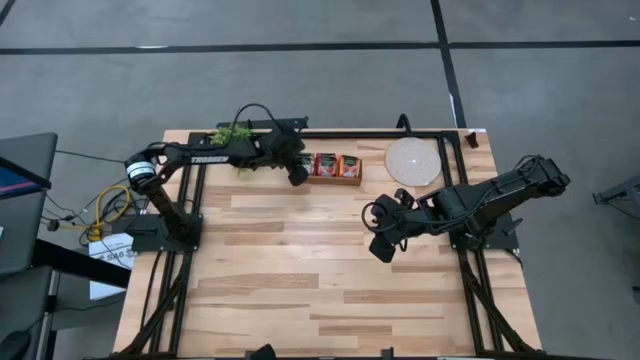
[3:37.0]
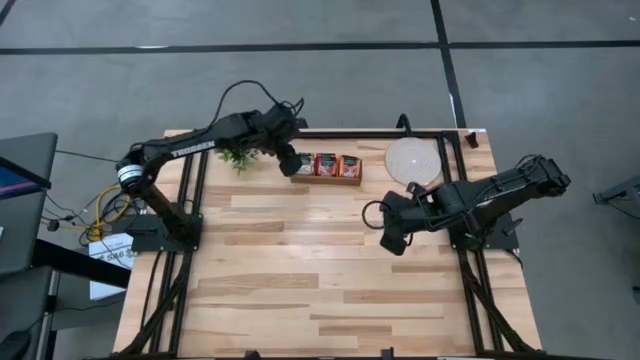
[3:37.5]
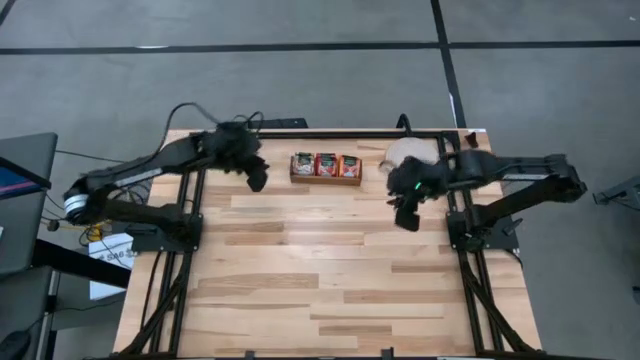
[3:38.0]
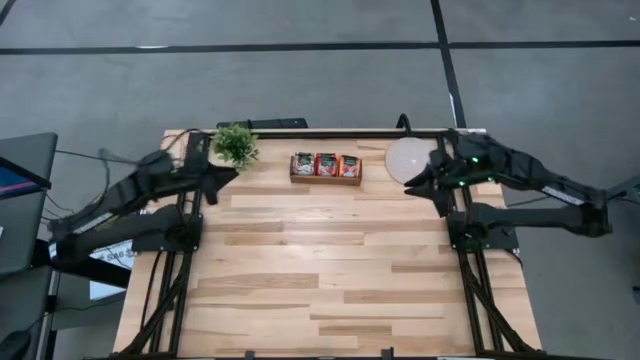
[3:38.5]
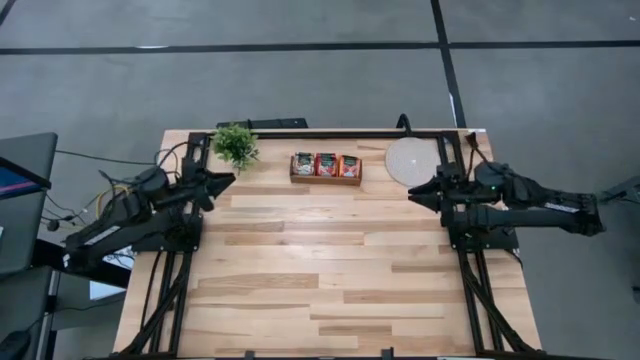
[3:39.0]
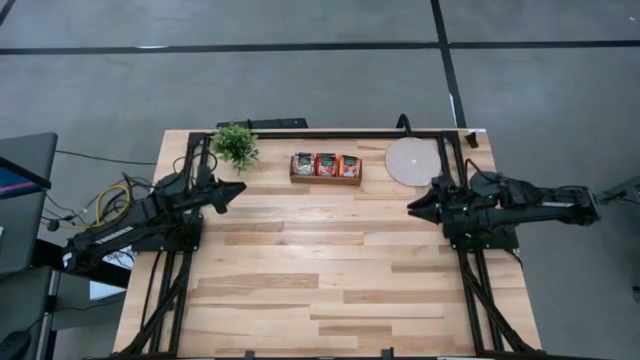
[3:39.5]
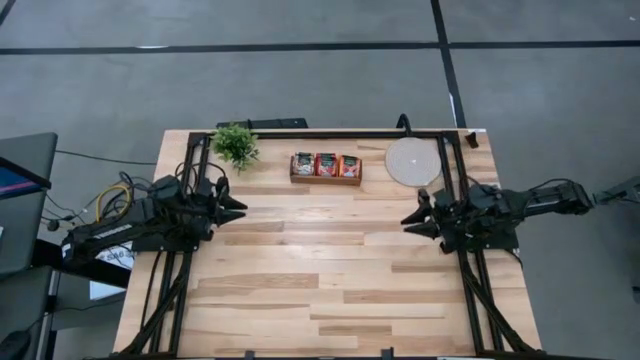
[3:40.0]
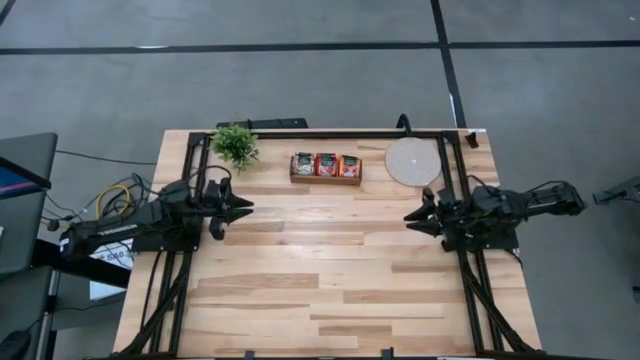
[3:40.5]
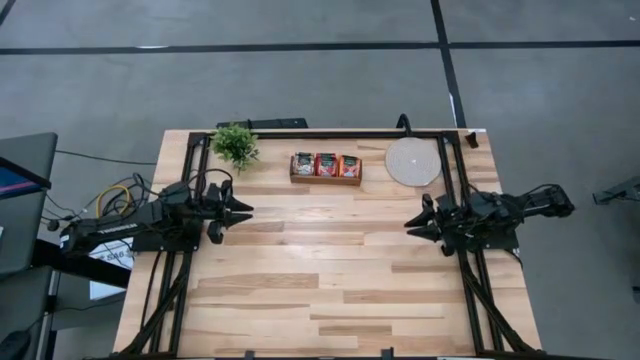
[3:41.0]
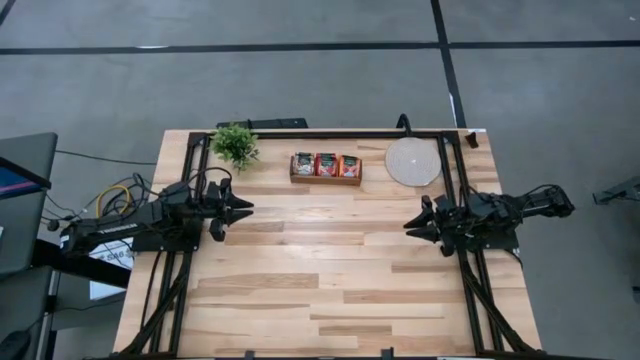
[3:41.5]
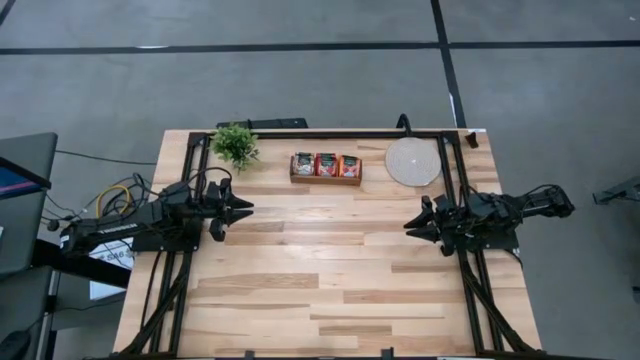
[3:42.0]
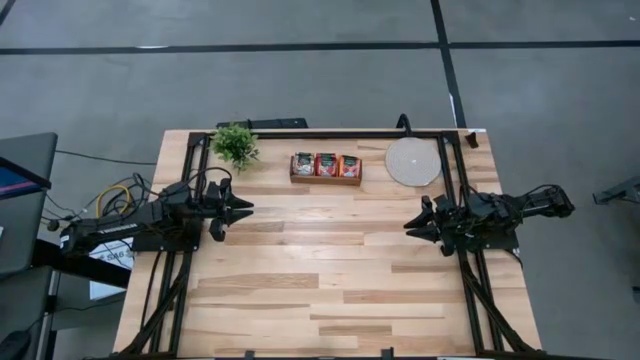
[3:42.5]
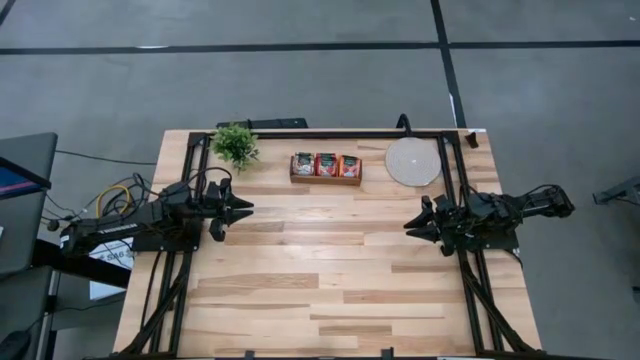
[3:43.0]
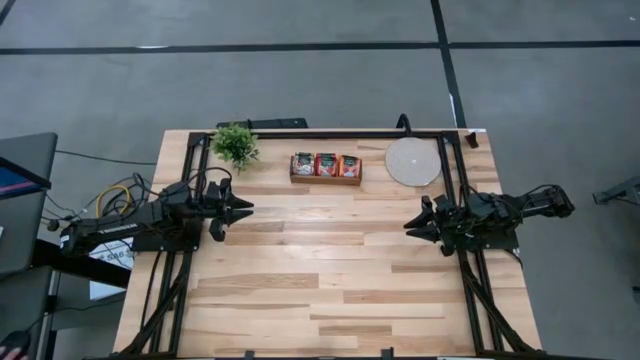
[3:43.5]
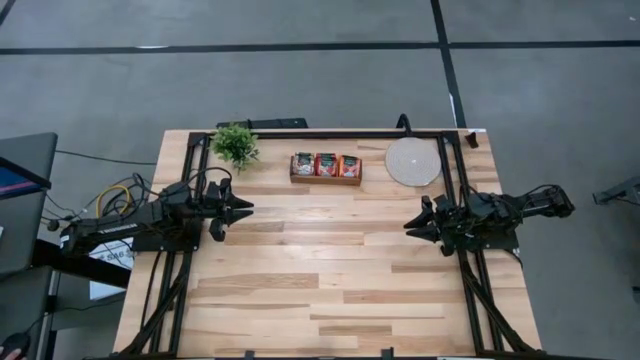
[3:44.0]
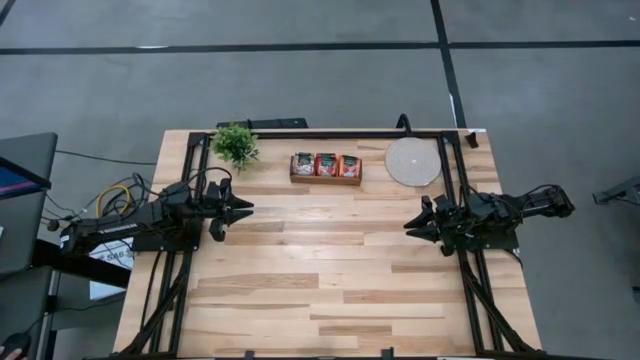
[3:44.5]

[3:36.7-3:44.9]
Task: Pick & Place Tea
Return to Home Position

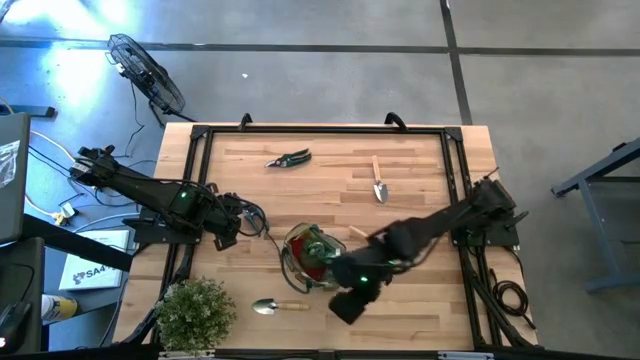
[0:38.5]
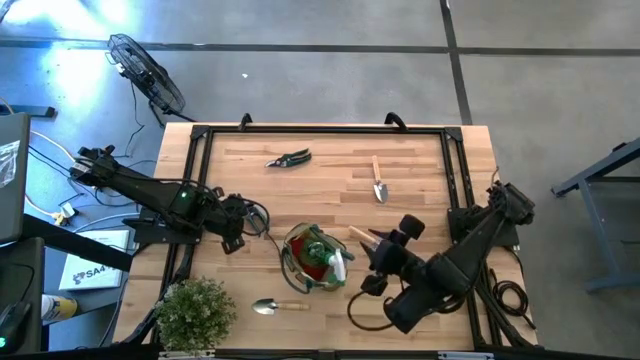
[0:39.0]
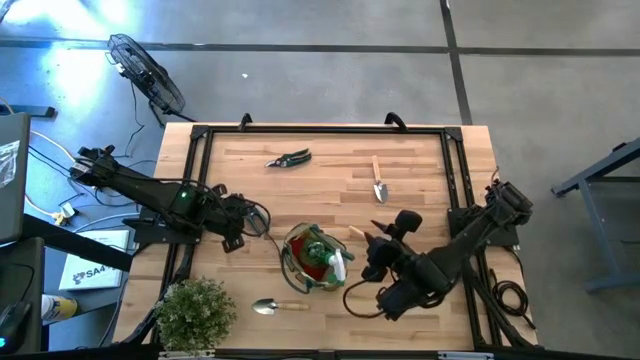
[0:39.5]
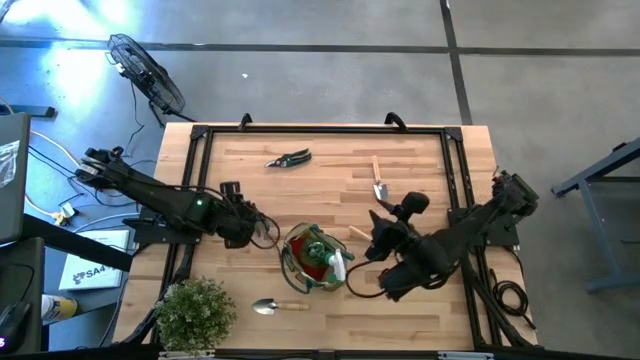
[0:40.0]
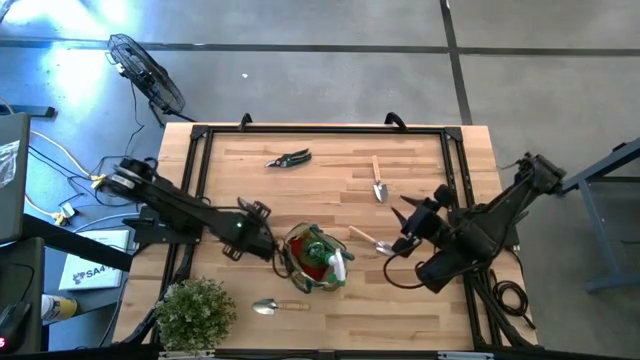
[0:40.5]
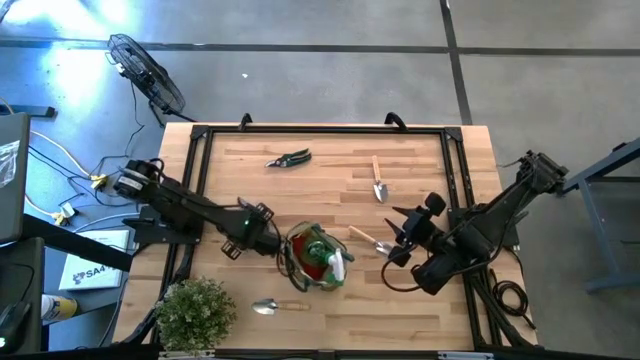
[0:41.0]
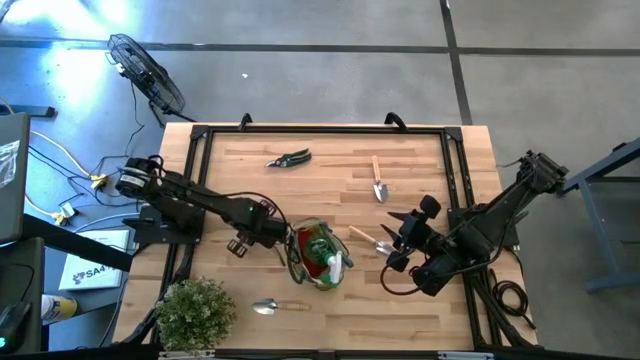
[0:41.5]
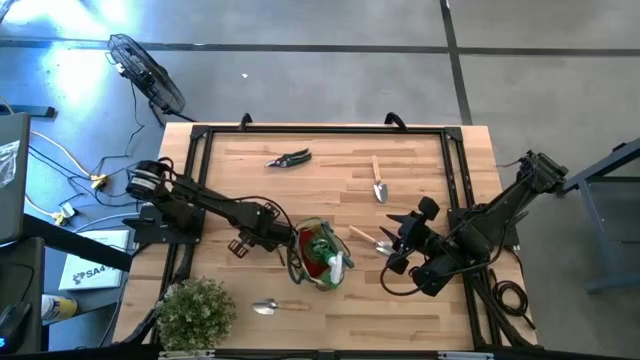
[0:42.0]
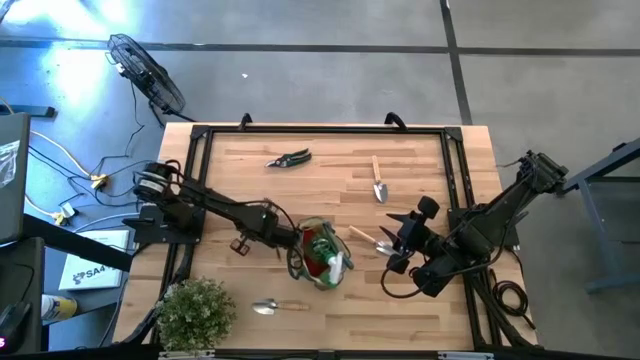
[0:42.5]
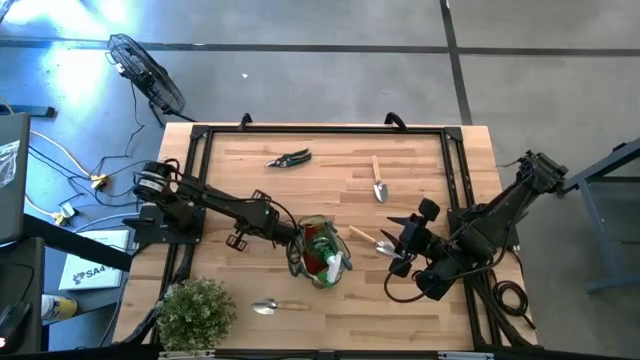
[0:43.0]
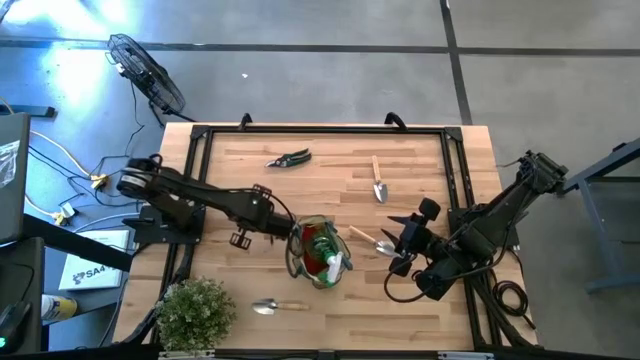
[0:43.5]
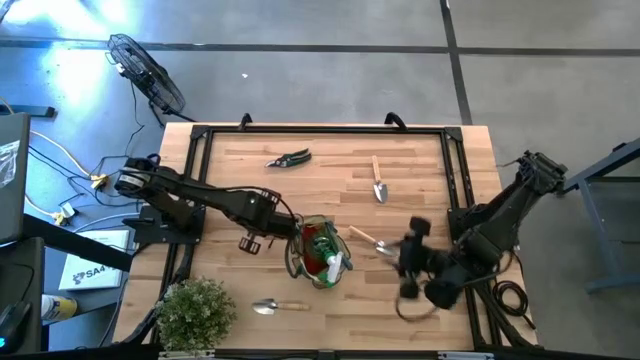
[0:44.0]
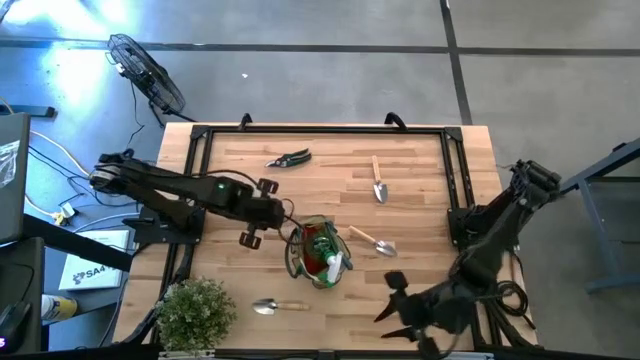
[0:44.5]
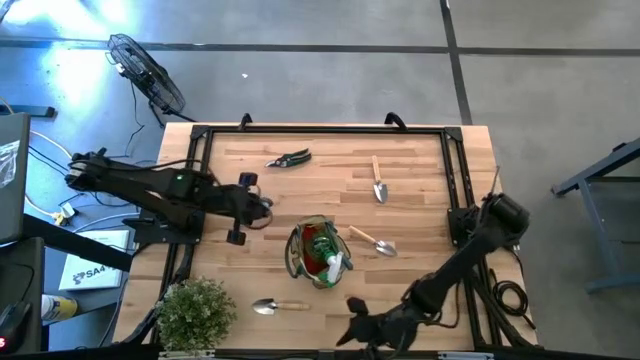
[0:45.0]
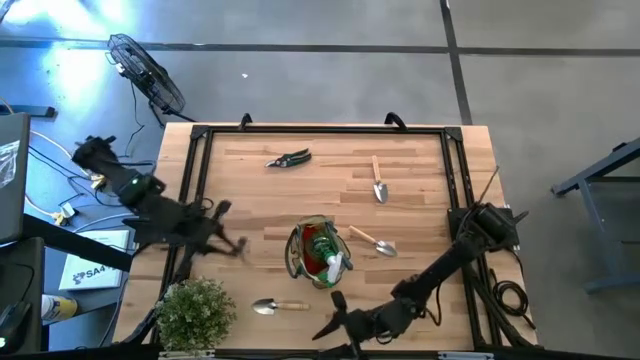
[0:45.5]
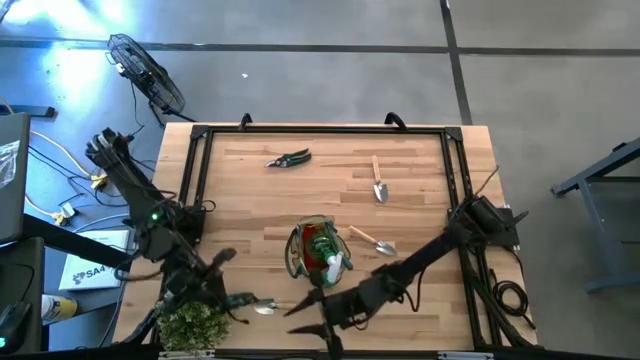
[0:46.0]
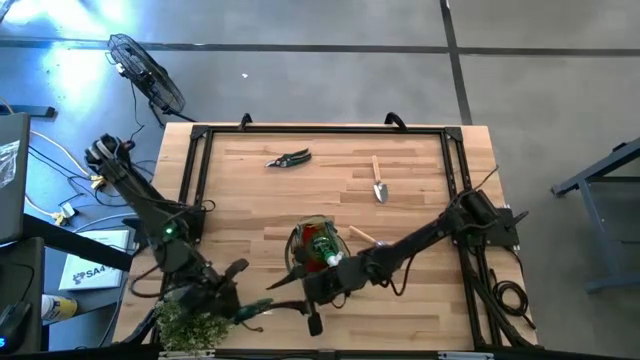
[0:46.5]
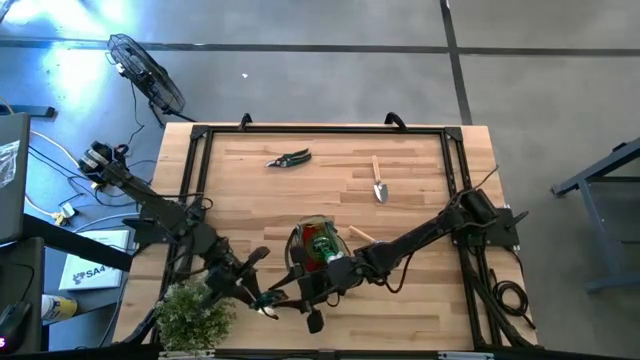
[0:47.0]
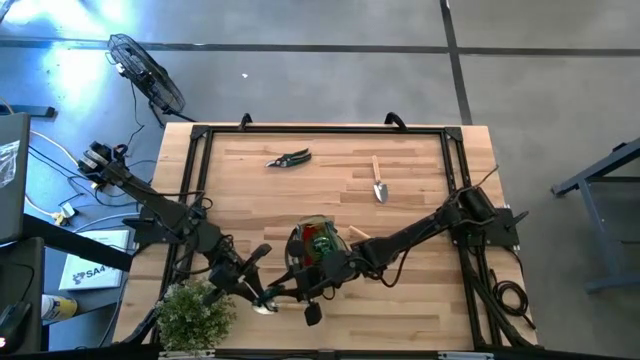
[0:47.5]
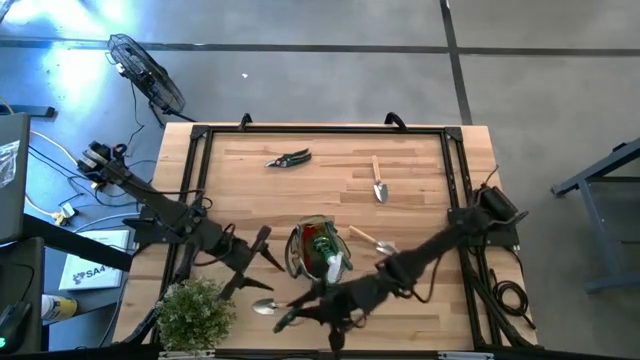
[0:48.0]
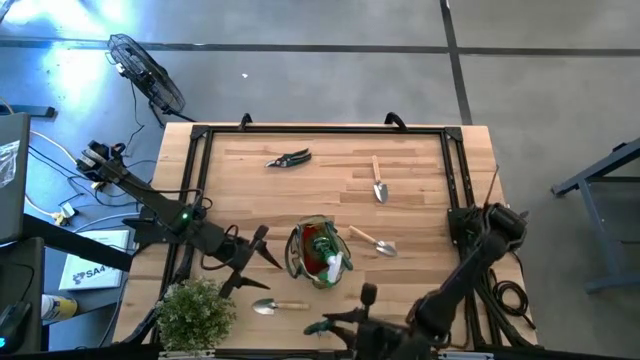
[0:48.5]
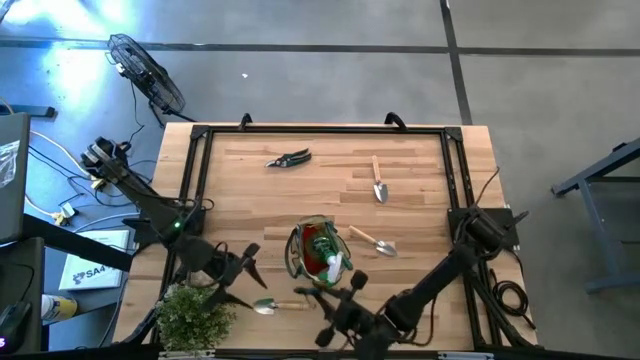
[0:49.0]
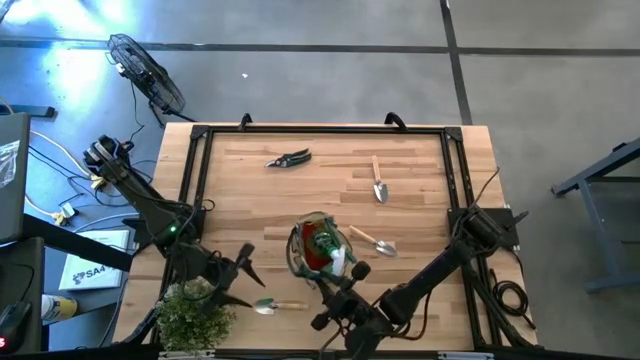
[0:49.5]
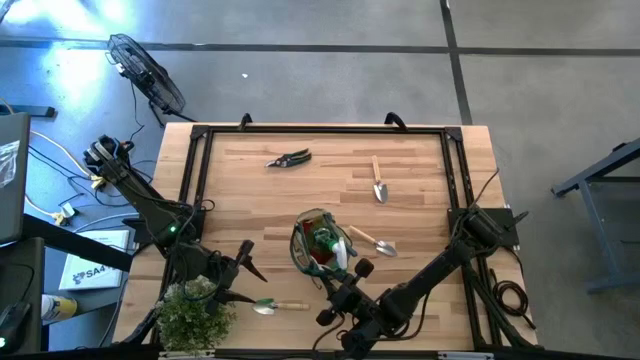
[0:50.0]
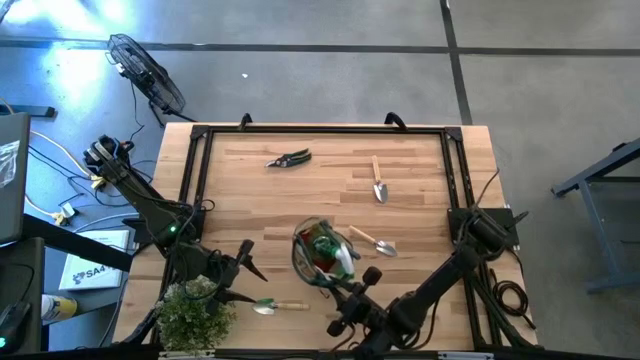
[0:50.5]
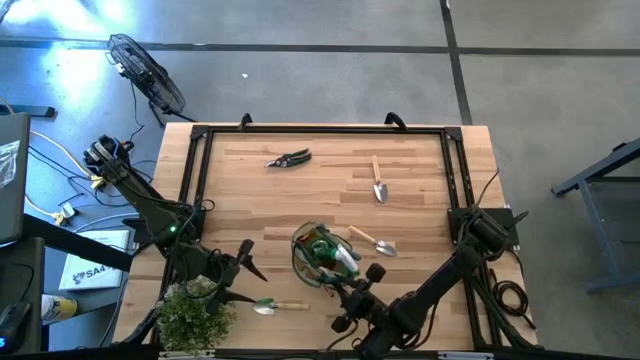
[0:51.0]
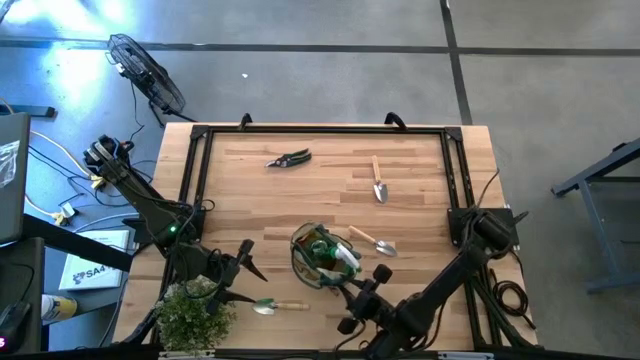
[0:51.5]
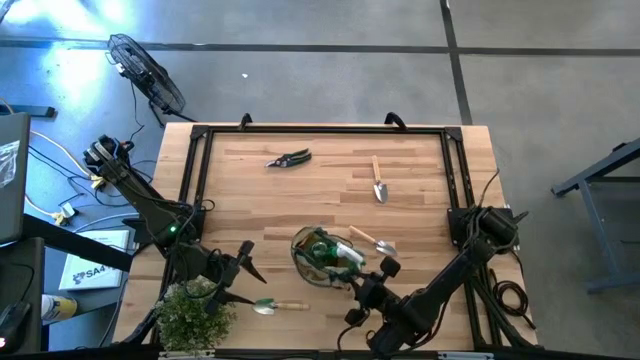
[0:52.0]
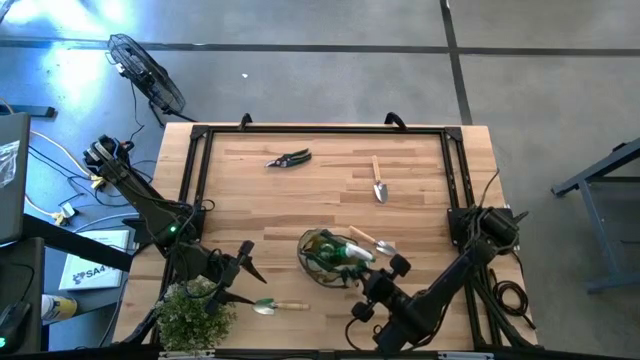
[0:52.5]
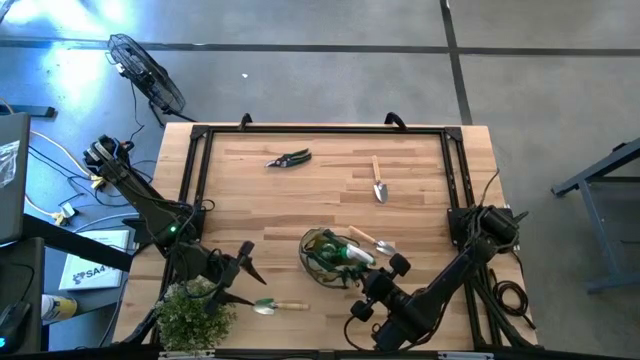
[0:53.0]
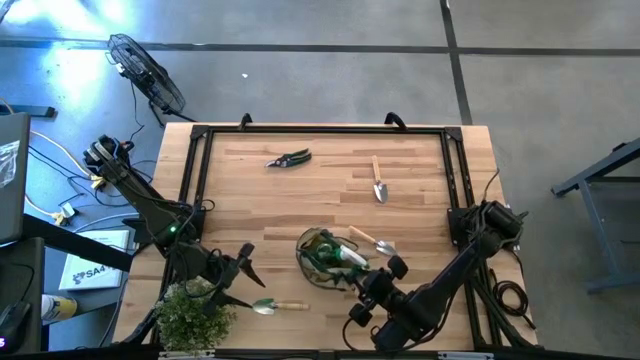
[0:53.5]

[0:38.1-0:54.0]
Task: Pick & Place Garden tools in Gardening bag
Put the bottom shear scissors into the gardening bag
